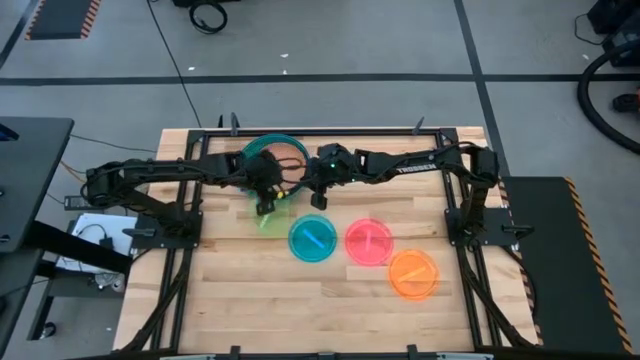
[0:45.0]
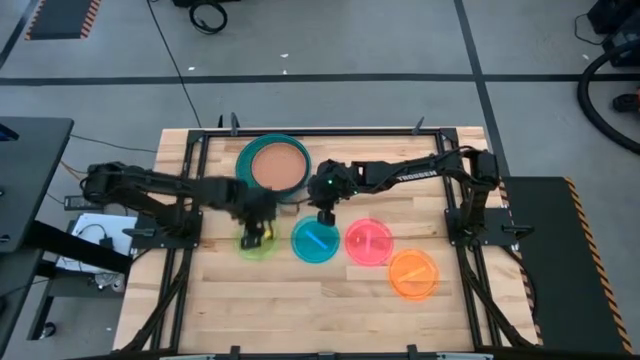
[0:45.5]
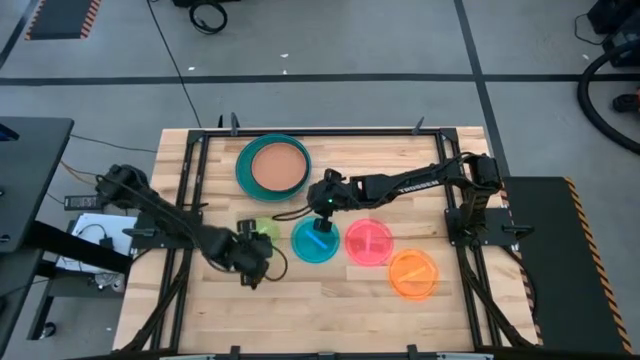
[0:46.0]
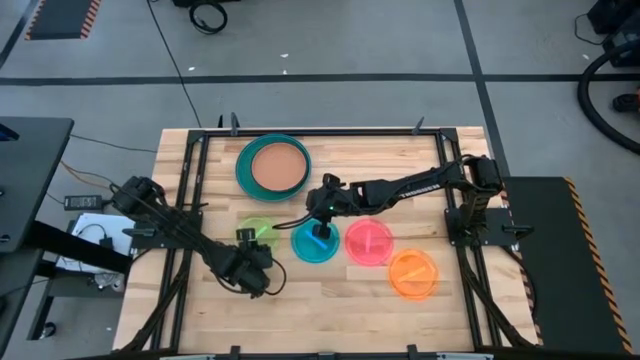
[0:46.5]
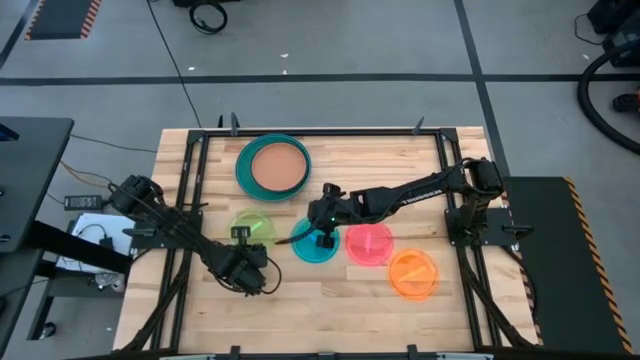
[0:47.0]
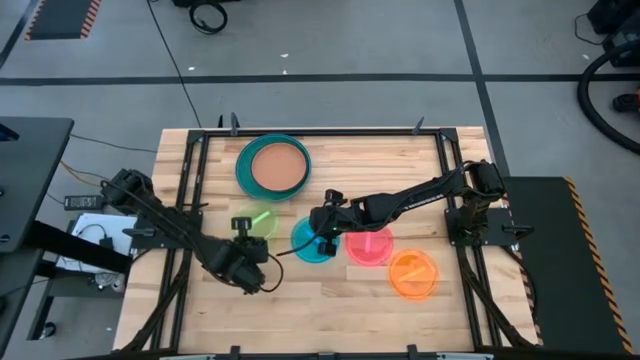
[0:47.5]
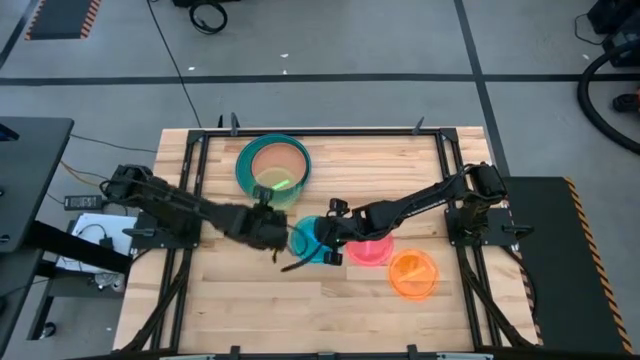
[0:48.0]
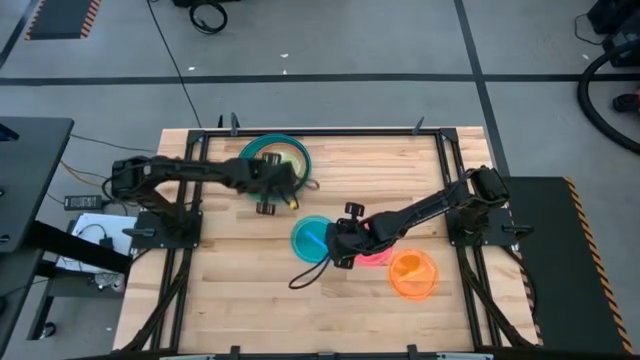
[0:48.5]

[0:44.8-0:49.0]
Task: Stack plastic plates
Stack the light green plate on top of the brown plate

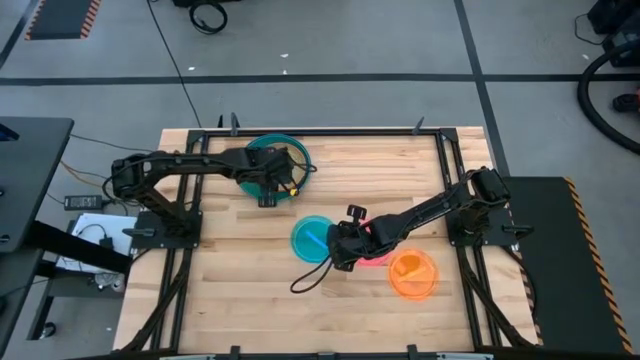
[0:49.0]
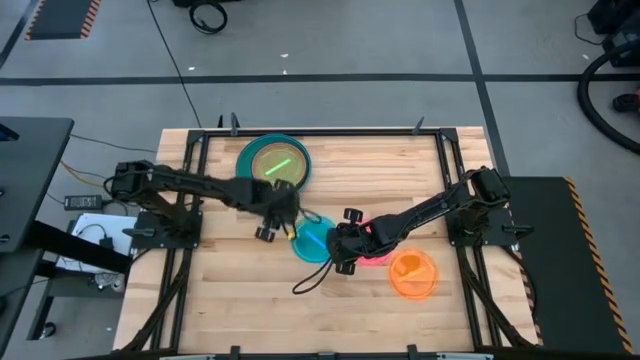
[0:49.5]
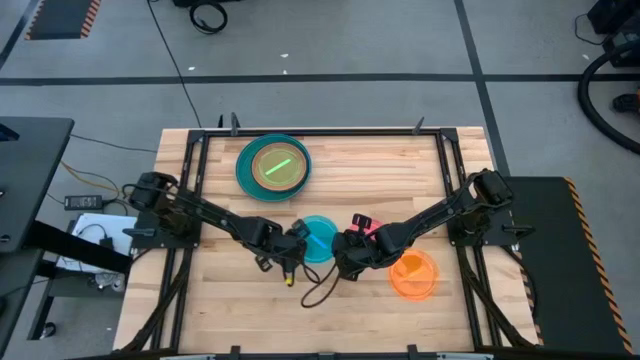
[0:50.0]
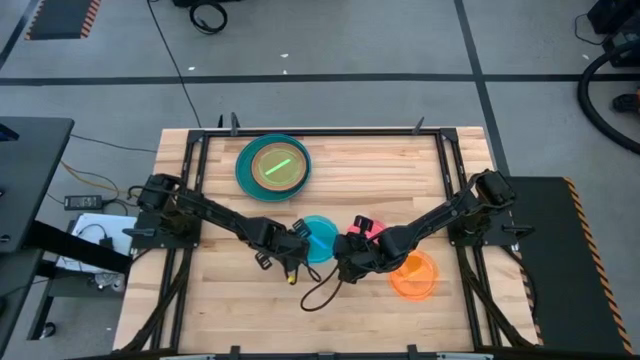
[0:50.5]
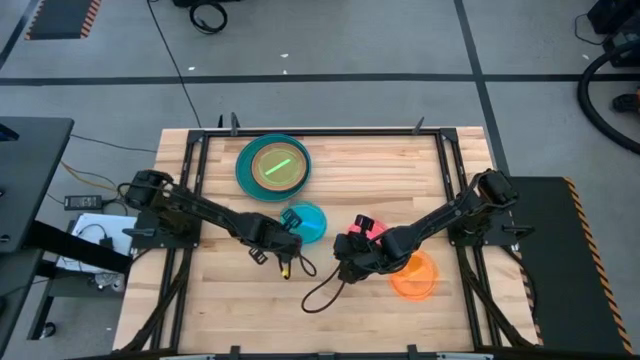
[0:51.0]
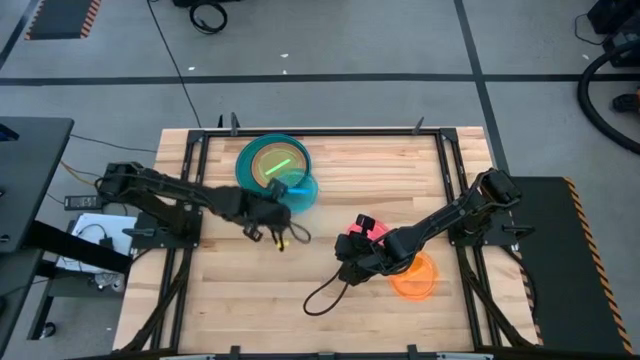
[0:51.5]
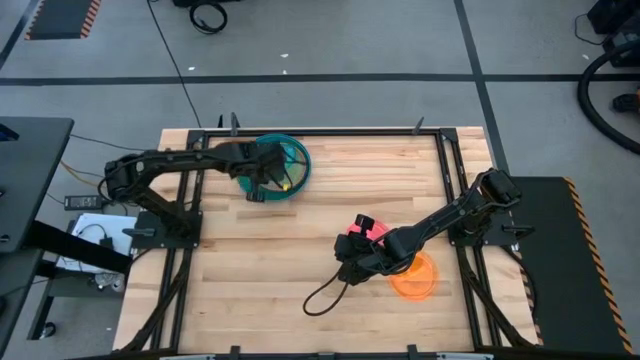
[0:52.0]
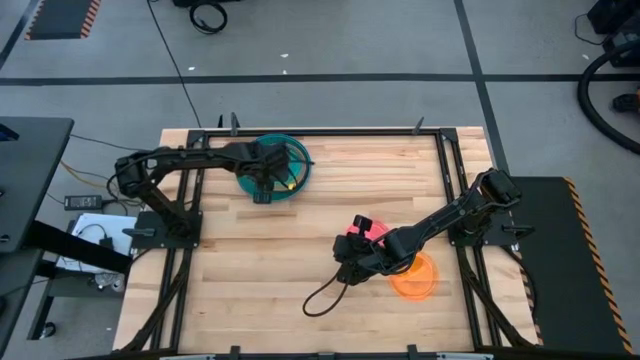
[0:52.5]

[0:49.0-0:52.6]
Stack the light blue plate on top of the light green plate

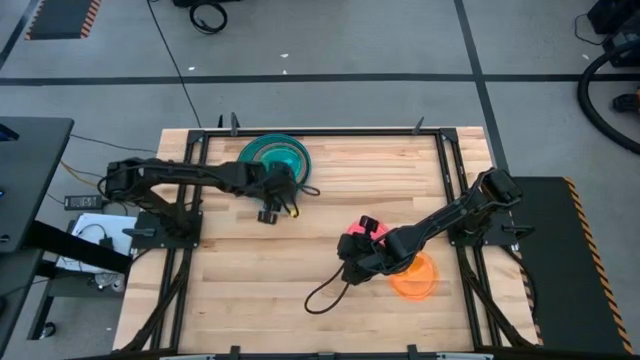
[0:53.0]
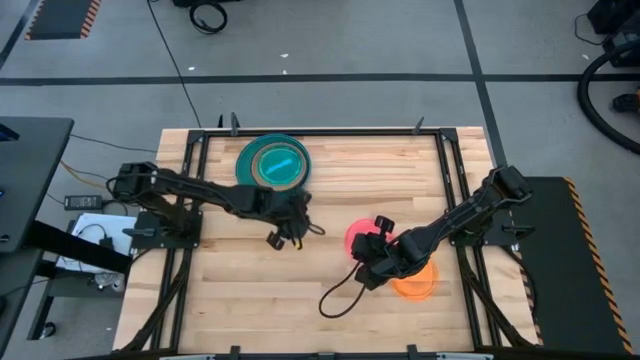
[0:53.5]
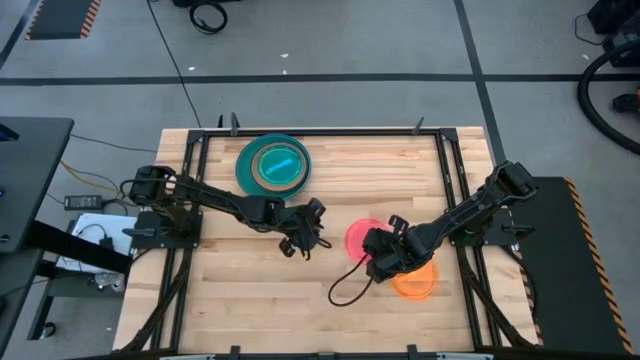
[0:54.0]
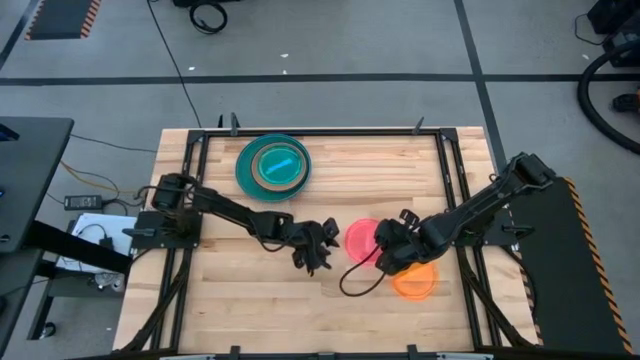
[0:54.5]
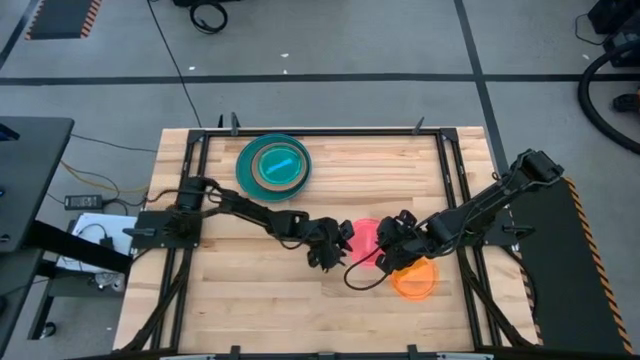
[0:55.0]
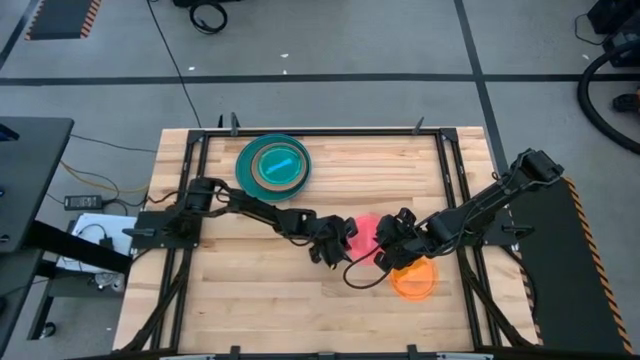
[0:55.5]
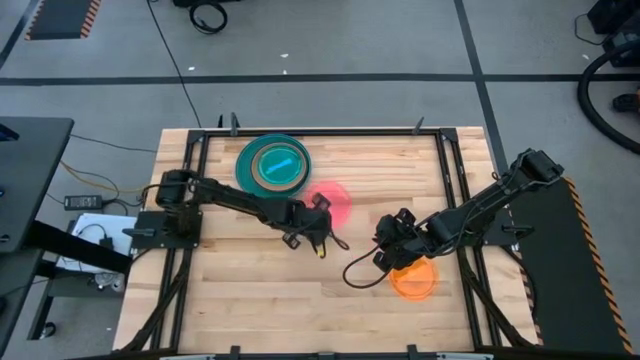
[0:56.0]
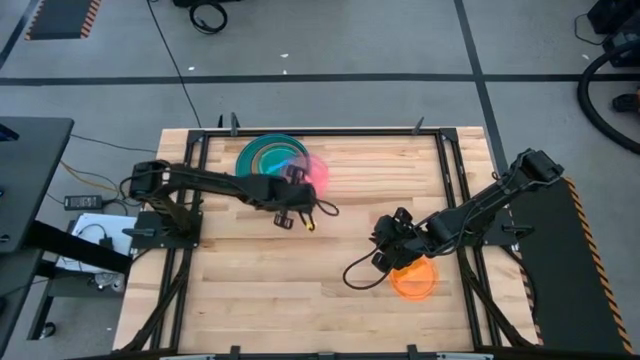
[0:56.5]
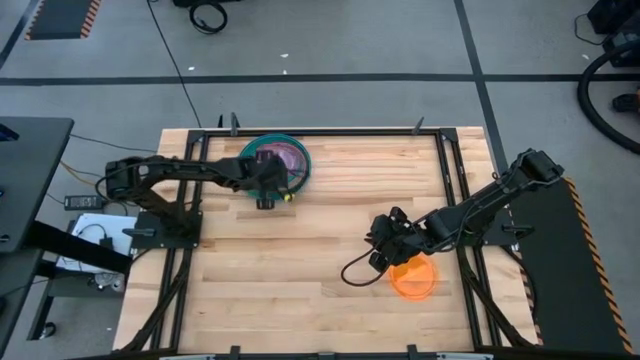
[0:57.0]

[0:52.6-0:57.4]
Stack the pink plate on top of the light blue plate

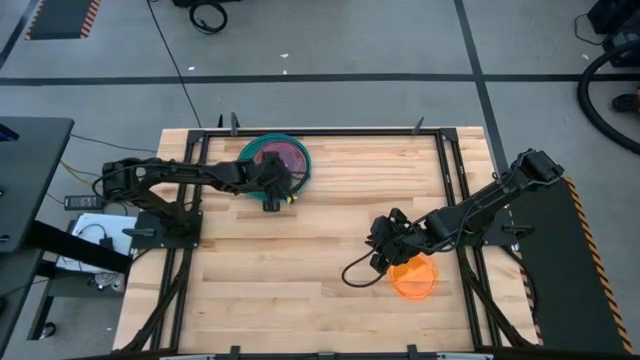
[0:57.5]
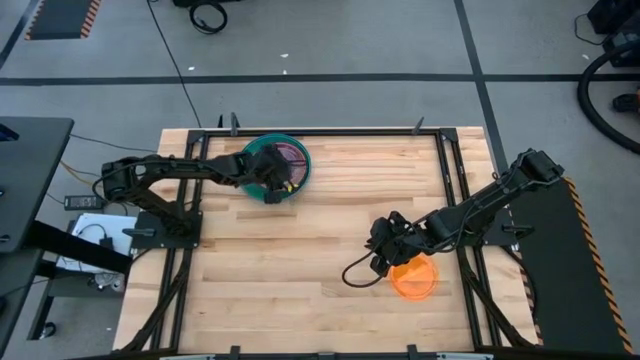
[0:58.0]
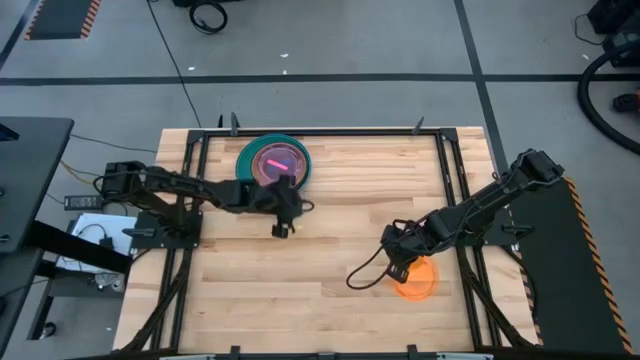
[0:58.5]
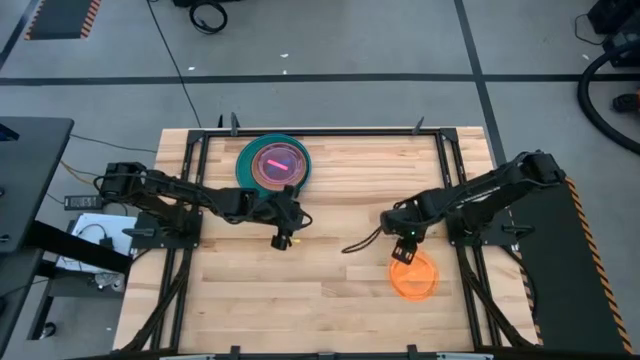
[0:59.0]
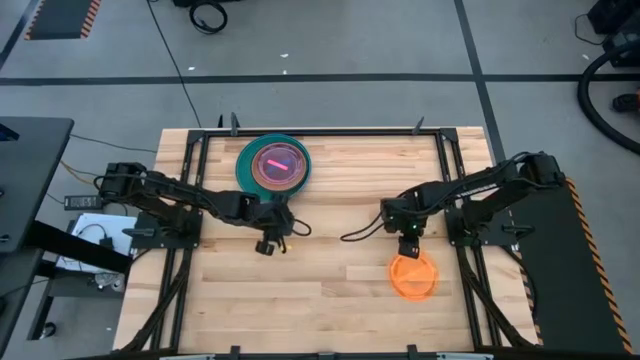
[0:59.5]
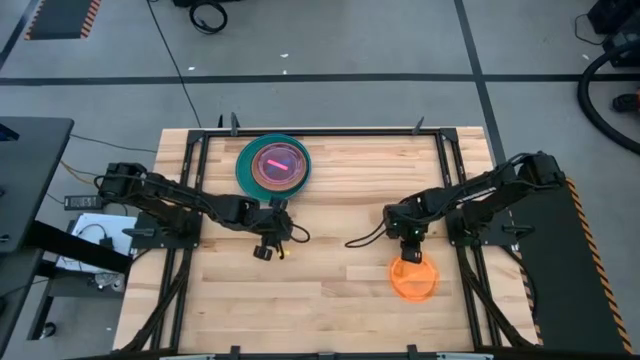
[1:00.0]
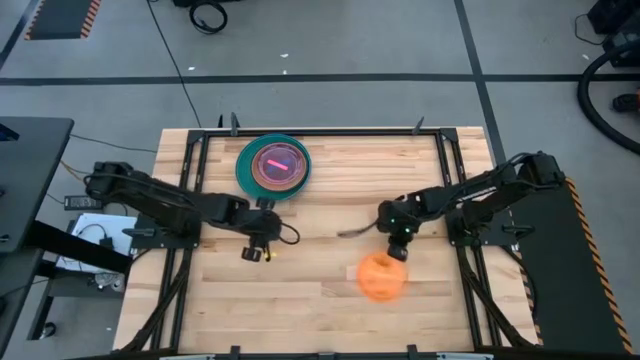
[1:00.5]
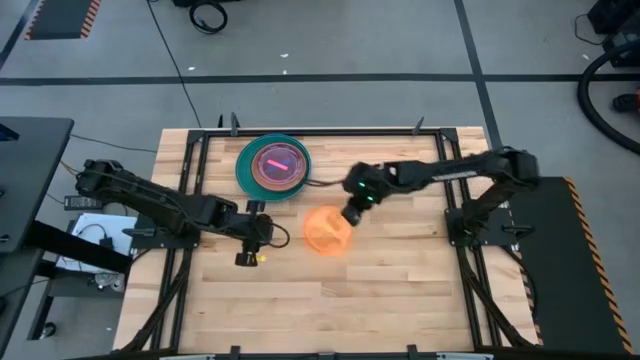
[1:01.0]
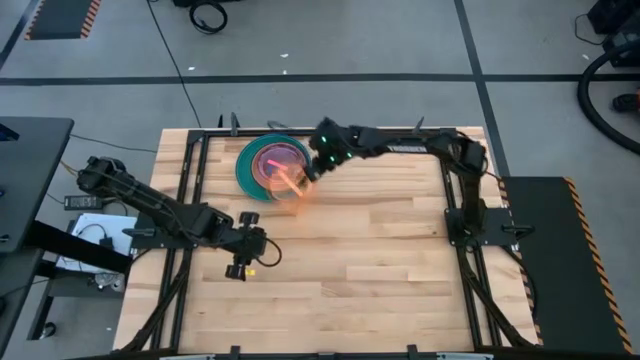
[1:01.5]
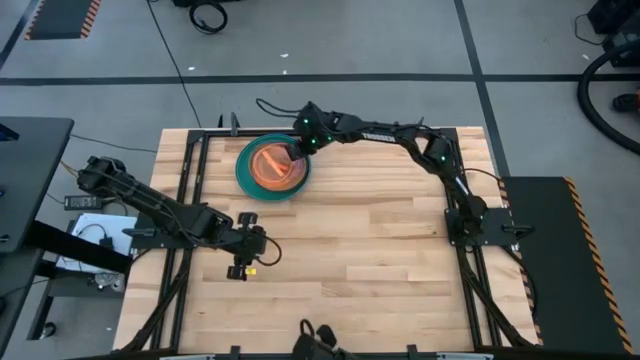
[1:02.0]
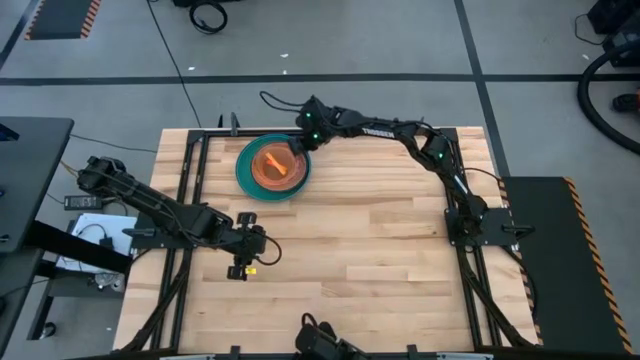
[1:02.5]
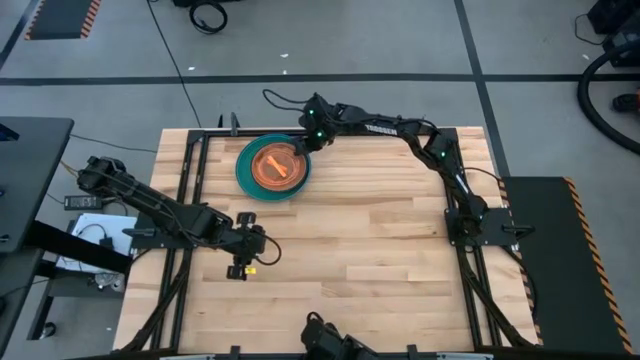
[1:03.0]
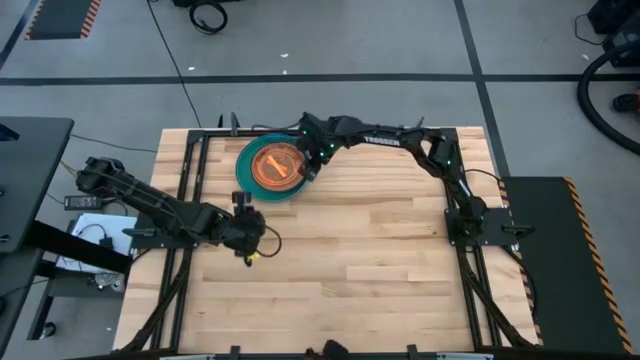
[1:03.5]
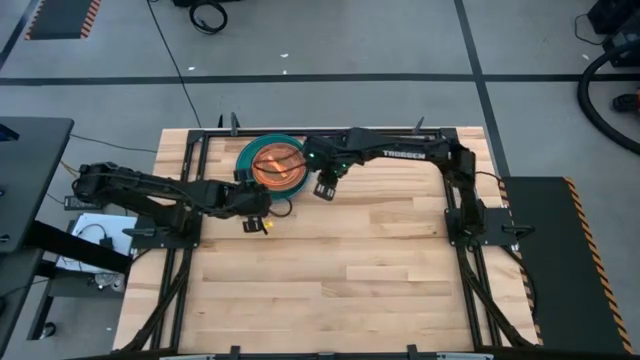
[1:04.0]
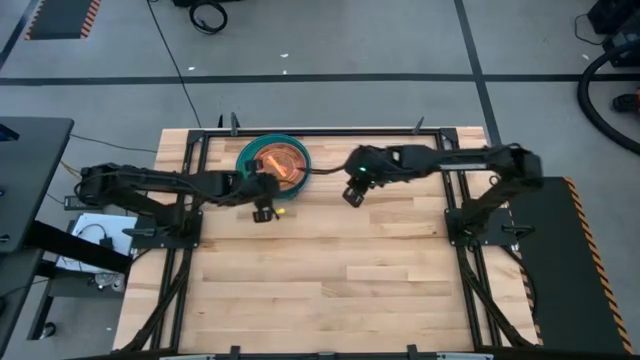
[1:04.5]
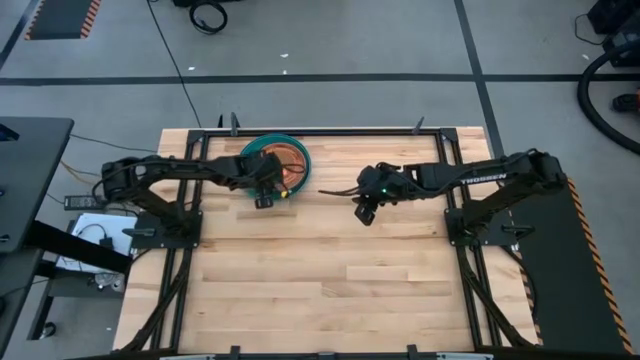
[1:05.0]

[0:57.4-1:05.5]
Stack the orange plate on top of the pink plate
